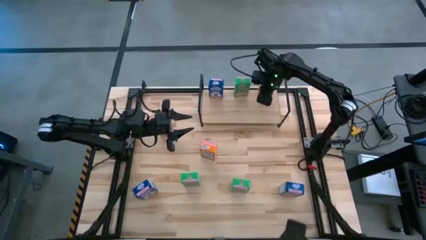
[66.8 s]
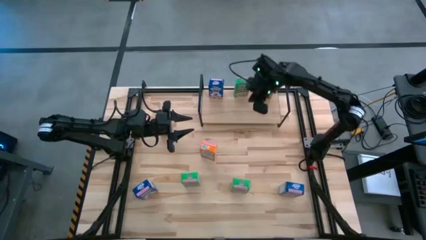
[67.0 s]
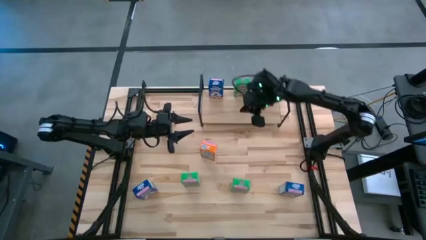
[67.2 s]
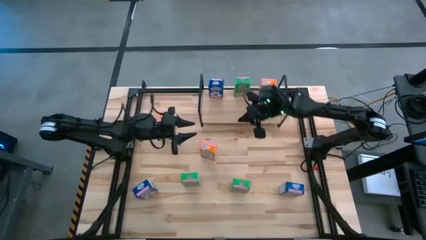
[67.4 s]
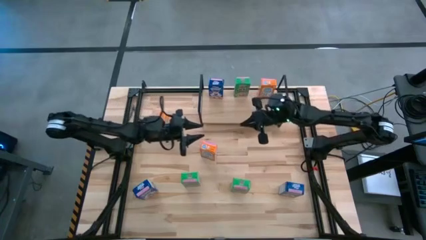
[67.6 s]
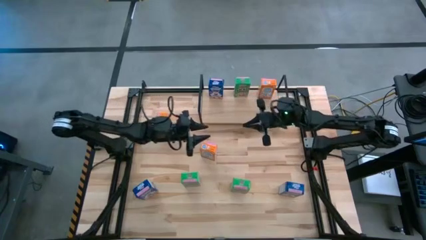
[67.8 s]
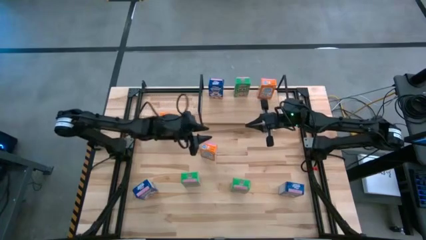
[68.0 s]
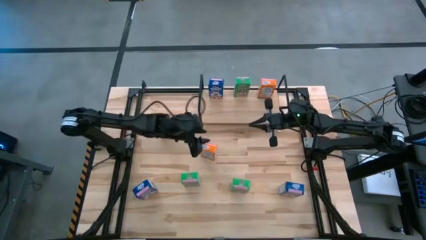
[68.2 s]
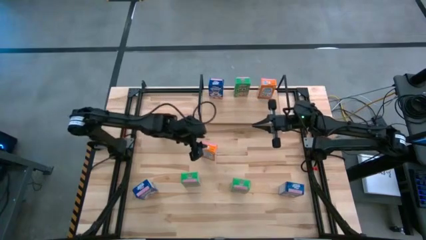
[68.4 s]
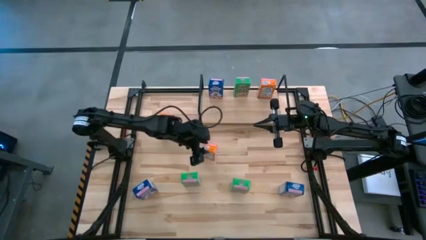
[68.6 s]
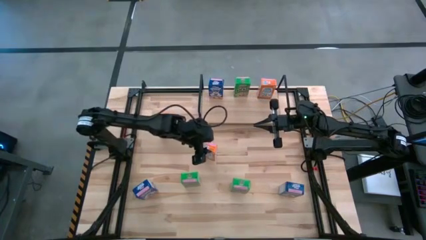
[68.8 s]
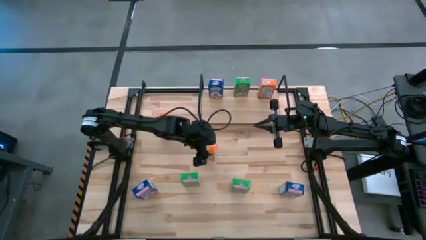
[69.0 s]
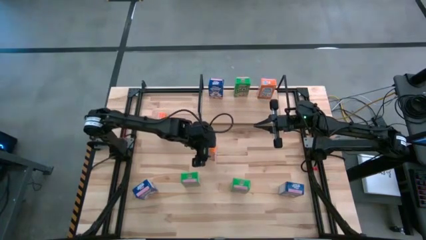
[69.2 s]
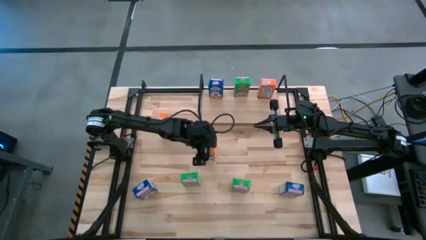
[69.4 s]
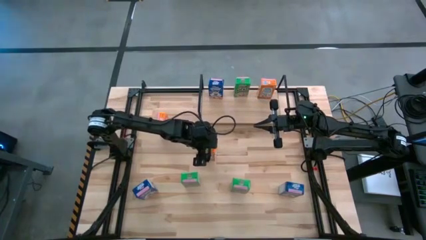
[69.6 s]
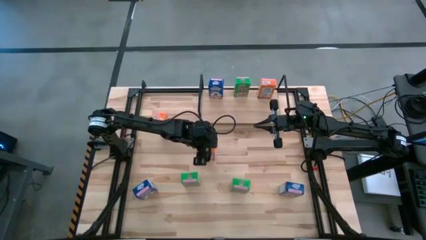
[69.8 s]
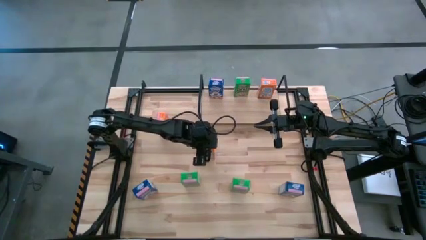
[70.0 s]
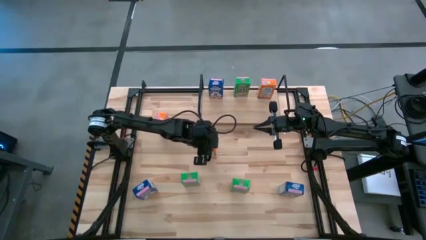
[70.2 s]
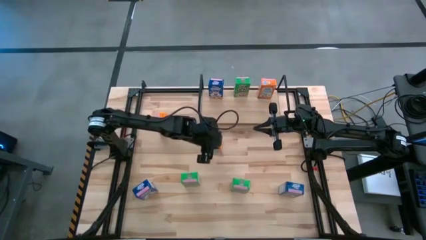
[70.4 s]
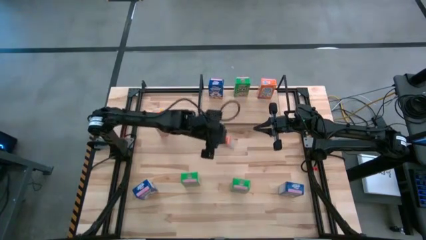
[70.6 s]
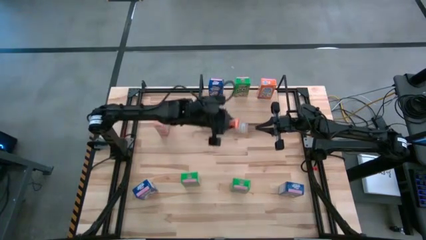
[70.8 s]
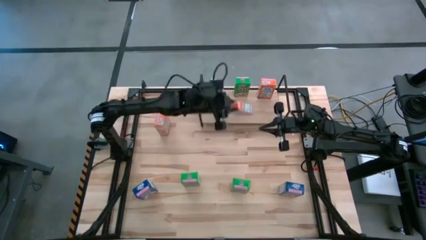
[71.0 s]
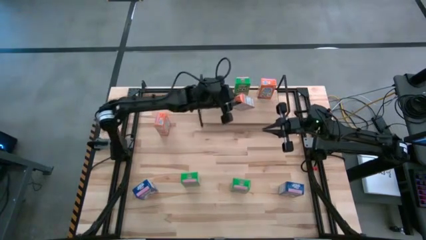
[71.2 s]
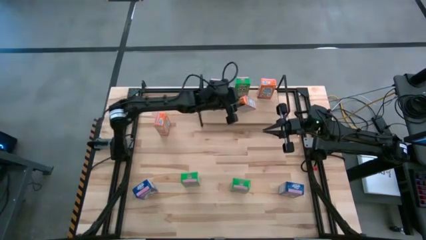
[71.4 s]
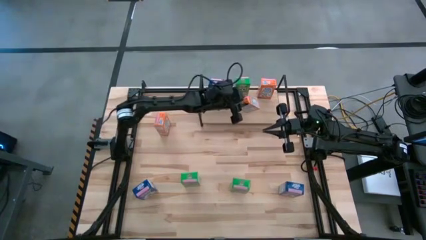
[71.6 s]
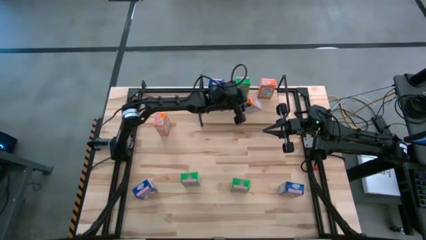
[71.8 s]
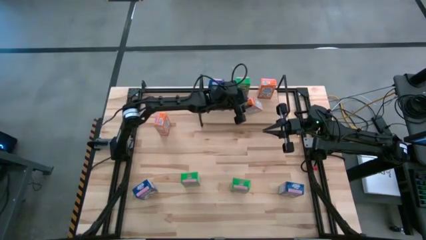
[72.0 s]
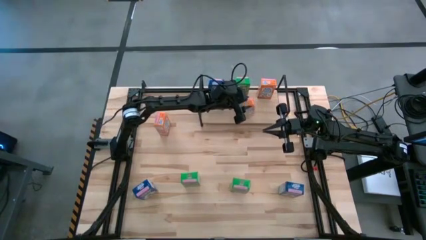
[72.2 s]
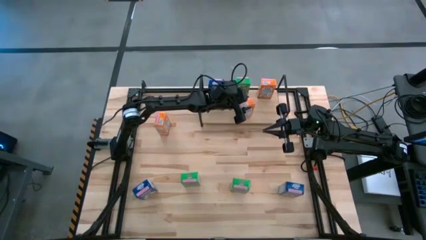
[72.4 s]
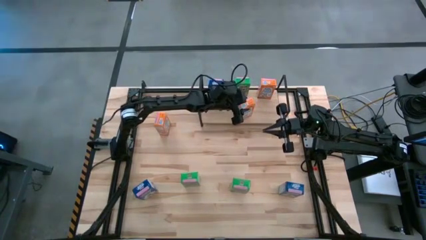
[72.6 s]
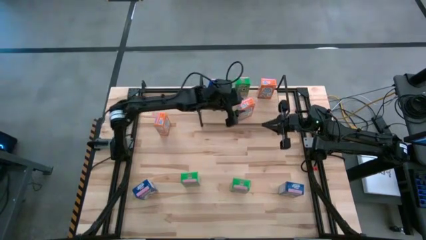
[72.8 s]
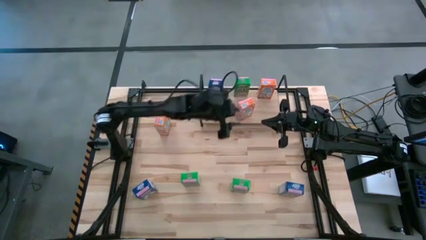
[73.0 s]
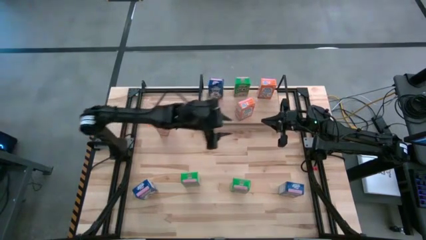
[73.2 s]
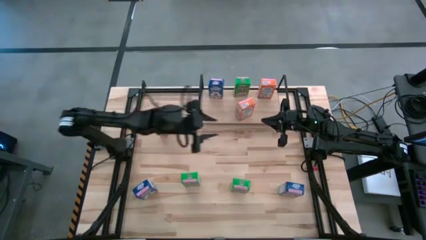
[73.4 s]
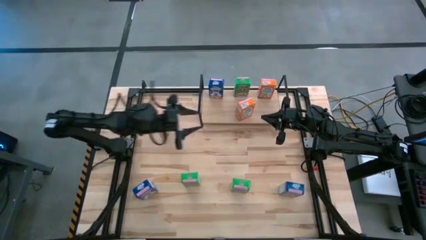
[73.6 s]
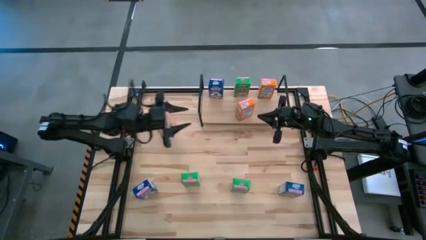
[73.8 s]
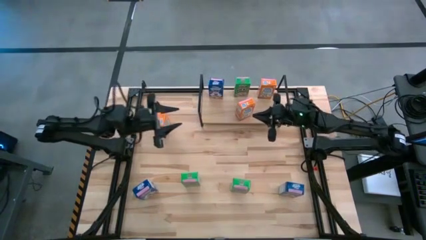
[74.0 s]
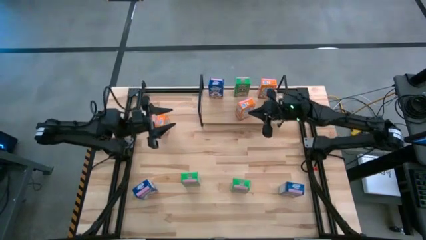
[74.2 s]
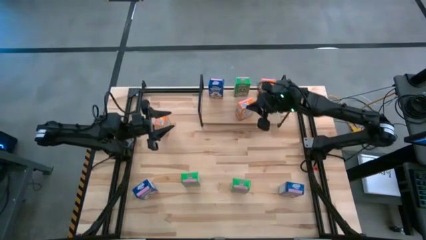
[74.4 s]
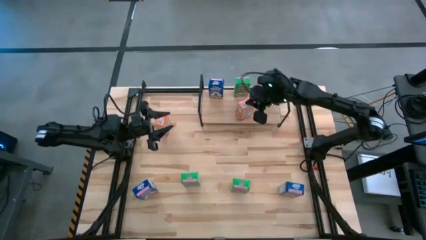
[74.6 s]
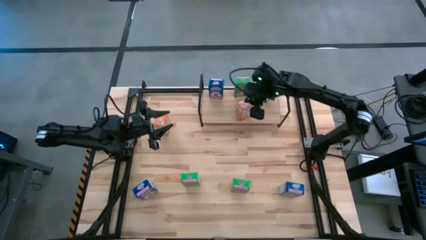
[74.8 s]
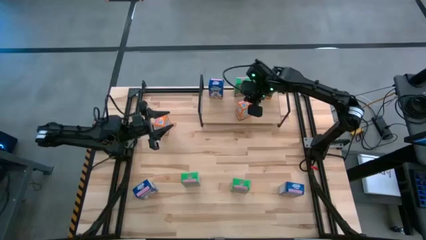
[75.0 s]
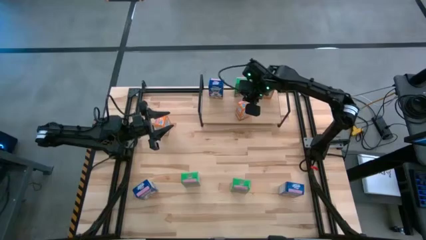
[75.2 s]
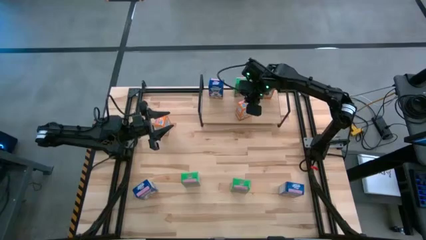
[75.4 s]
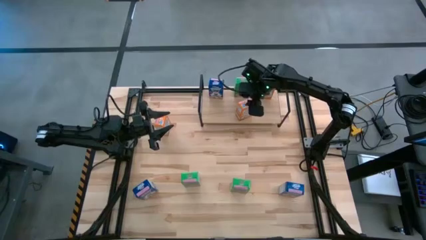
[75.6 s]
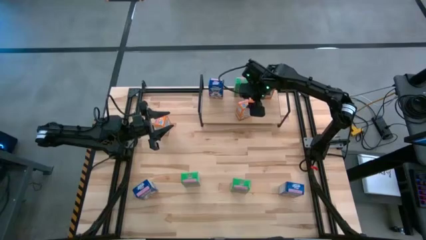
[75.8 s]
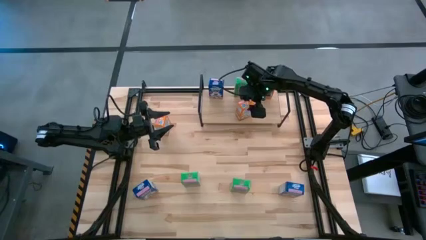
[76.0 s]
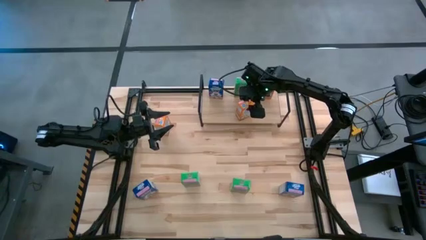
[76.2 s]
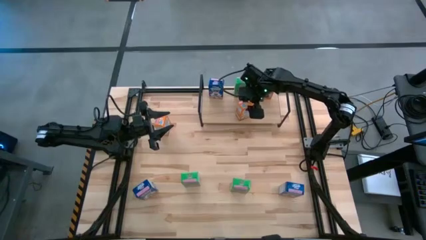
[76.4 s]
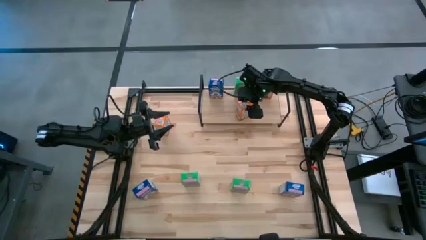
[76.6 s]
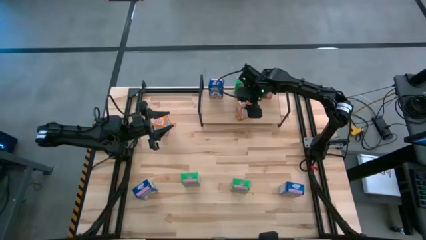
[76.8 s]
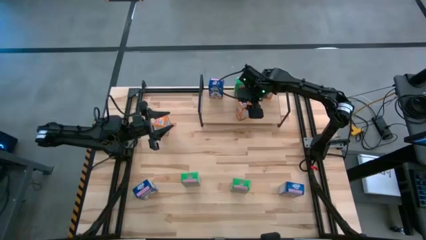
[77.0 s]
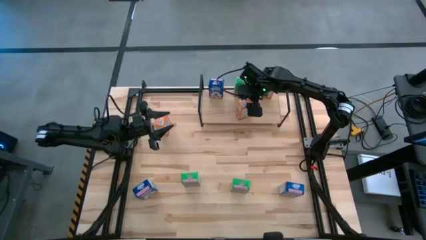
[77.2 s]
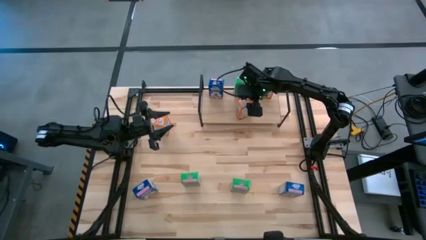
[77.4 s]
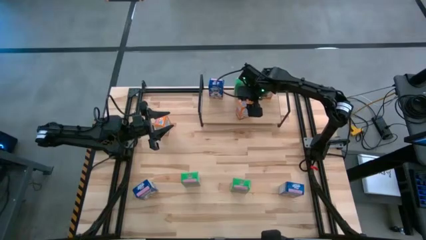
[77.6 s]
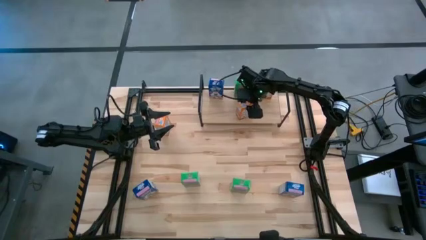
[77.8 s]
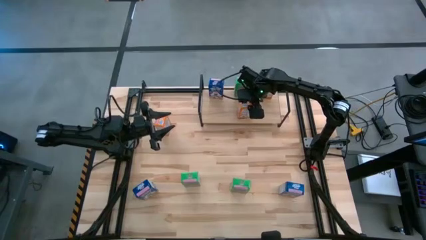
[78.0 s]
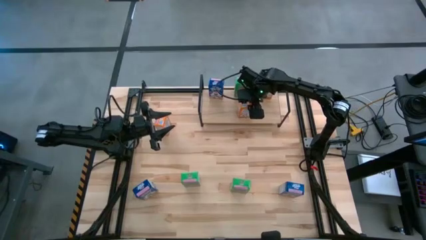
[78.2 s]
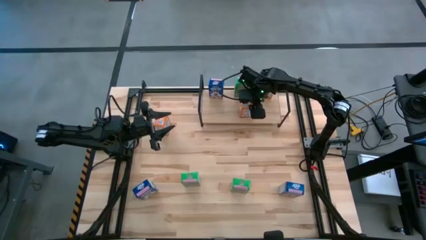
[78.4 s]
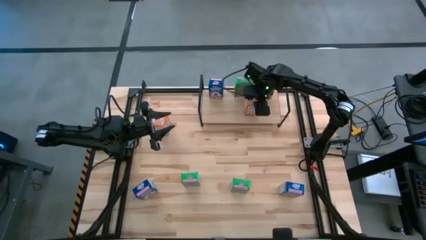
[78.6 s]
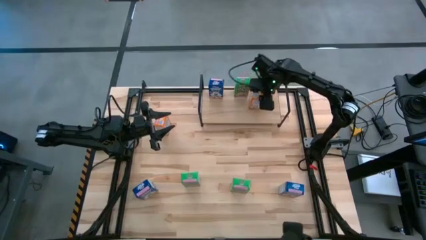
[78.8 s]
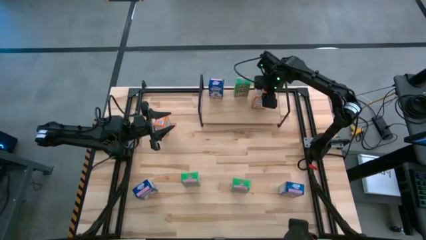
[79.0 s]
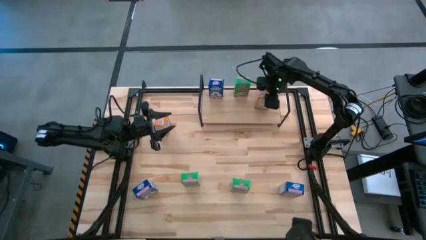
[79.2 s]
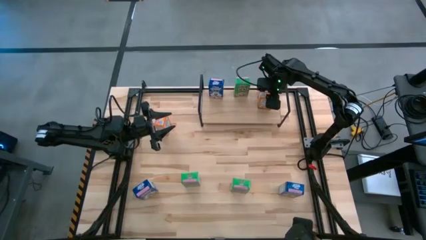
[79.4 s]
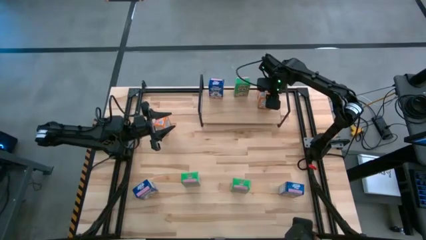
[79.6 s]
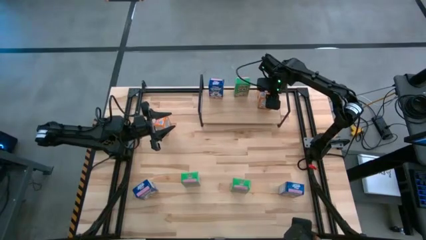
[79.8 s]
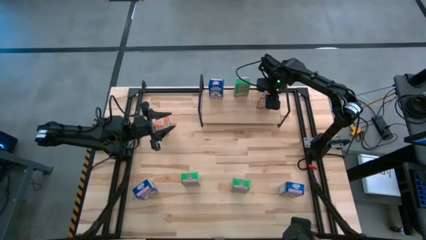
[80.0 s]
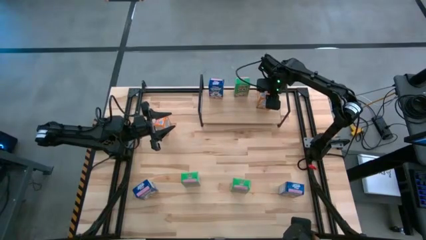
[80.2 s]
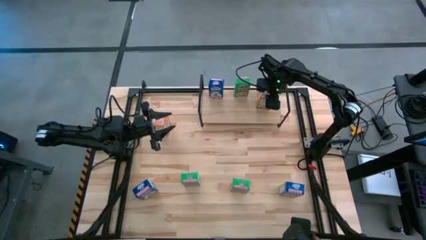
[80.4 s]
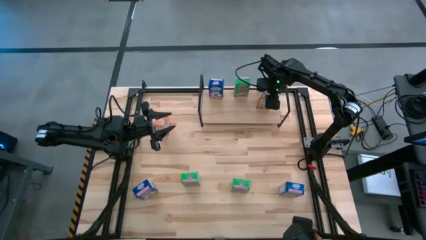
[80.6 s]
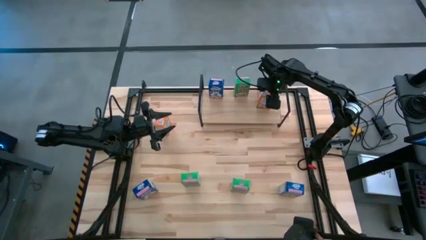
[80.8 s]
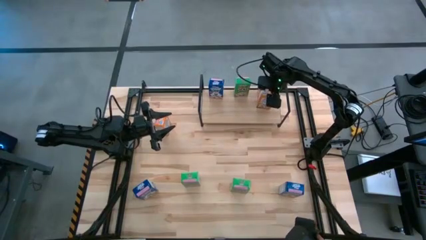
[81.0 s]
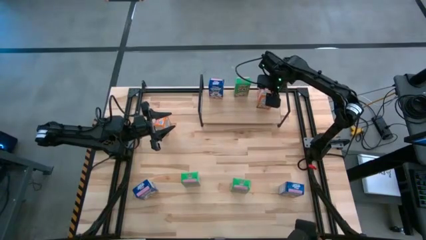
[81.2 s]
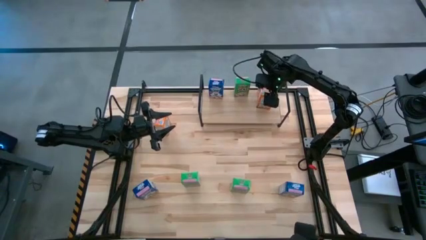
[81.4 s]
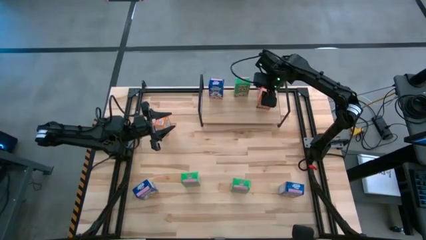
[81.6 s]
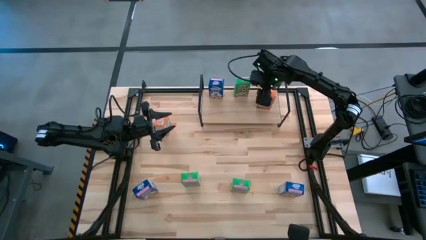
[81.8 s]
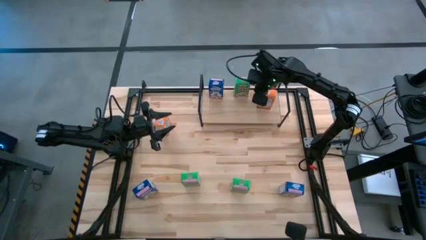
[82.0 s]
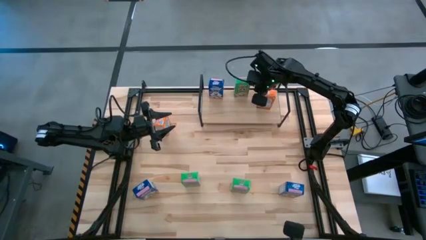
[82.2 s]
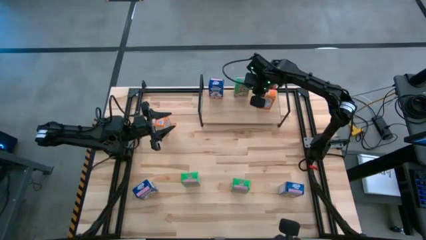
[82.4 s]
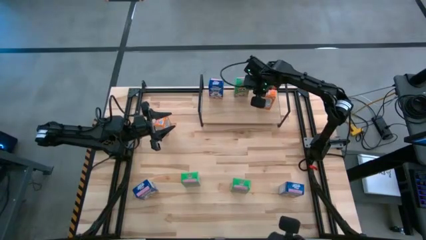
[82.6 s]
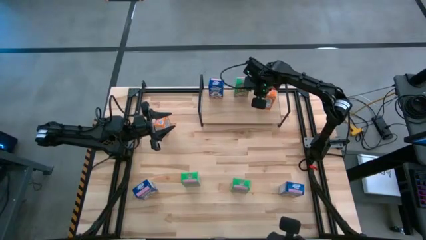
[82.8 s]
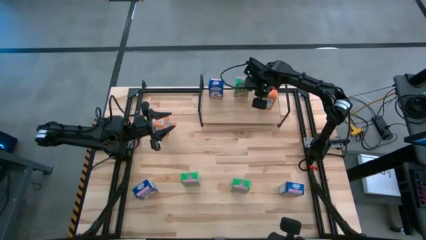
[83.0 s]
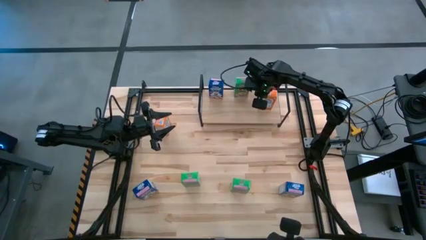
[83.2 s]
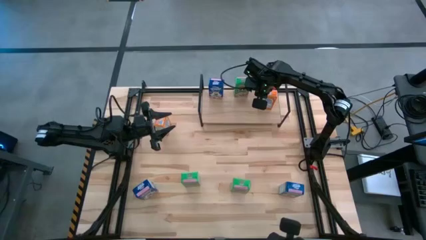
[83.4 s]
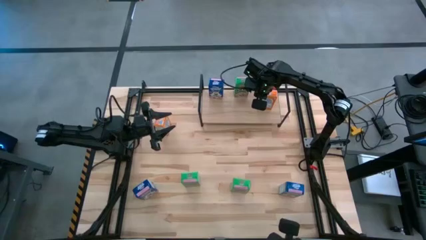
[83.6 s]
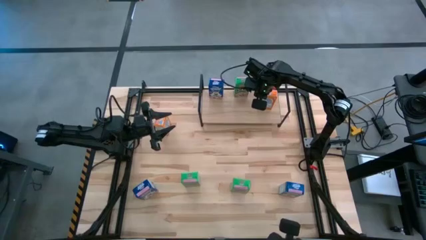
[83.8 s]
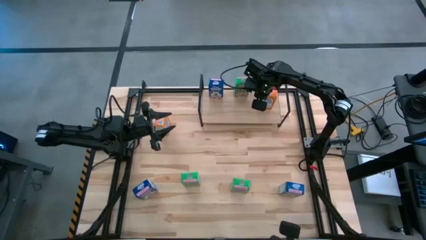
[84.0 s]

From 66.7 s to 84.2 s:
Task: Stack cereal on shelf
Put the bottom orange cereal box aligned with the other orange cereal box on the shelf
